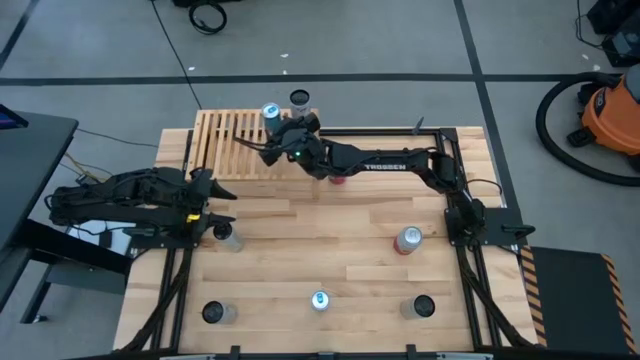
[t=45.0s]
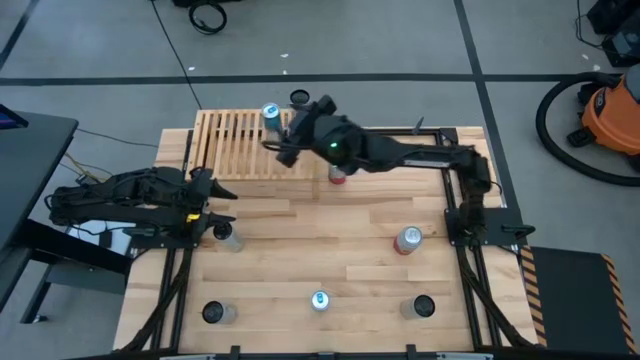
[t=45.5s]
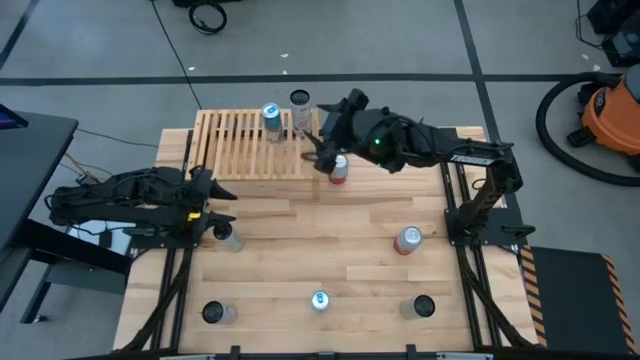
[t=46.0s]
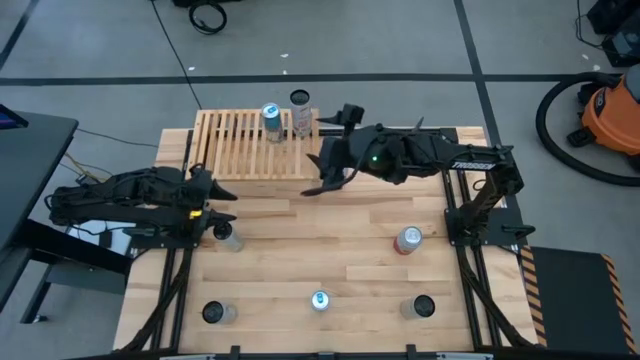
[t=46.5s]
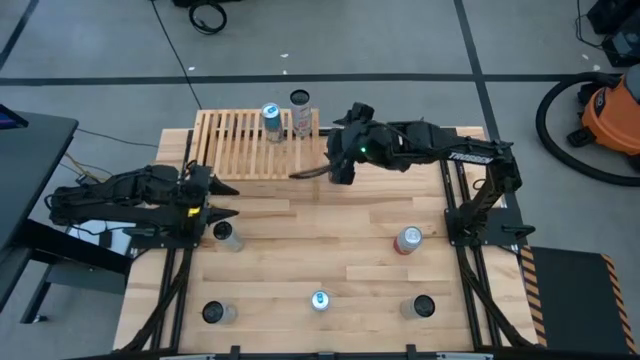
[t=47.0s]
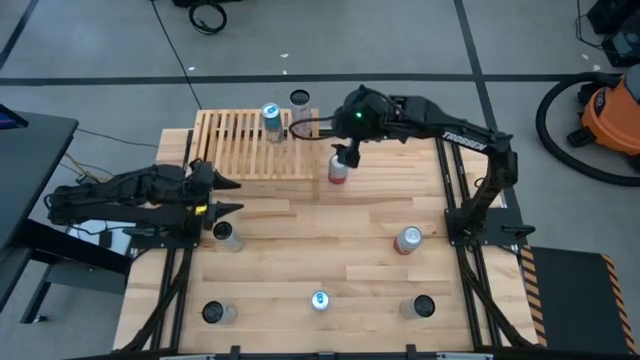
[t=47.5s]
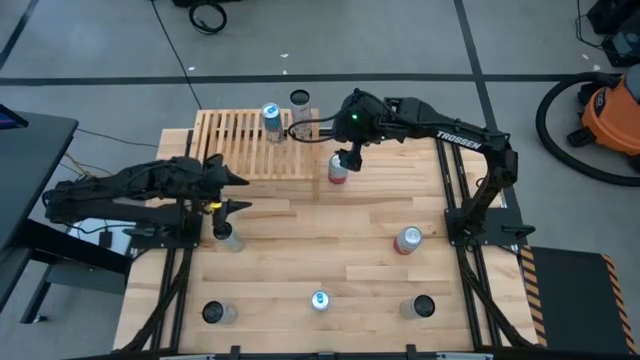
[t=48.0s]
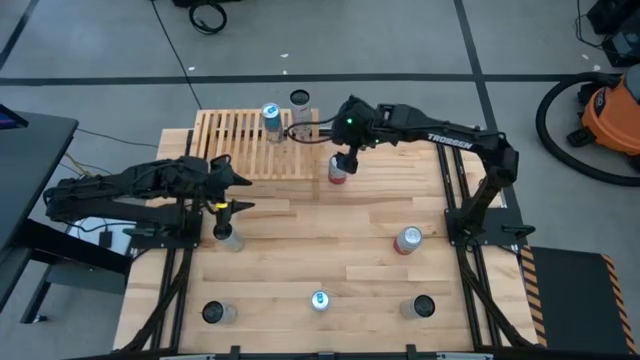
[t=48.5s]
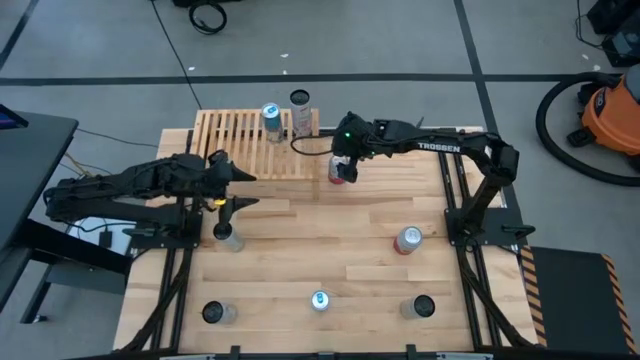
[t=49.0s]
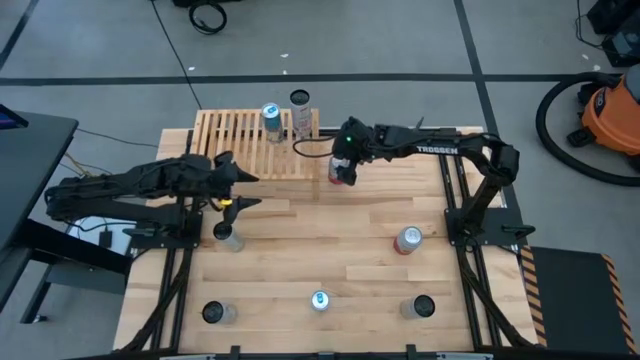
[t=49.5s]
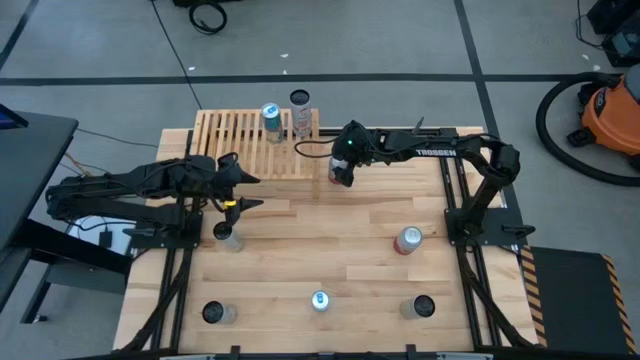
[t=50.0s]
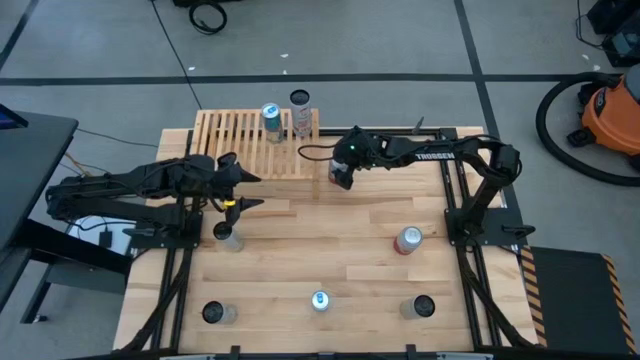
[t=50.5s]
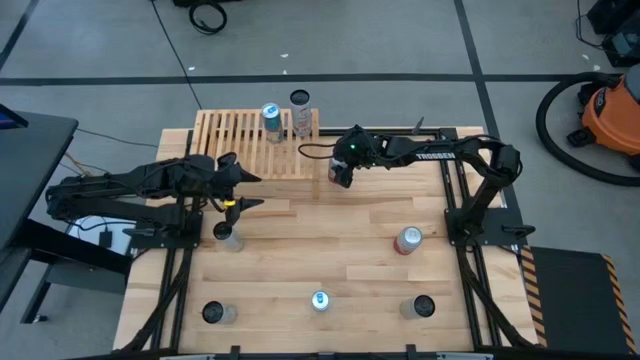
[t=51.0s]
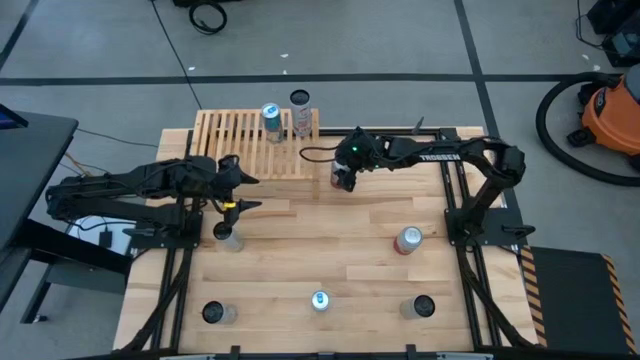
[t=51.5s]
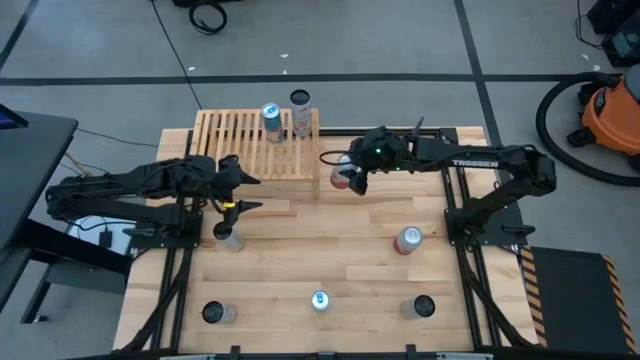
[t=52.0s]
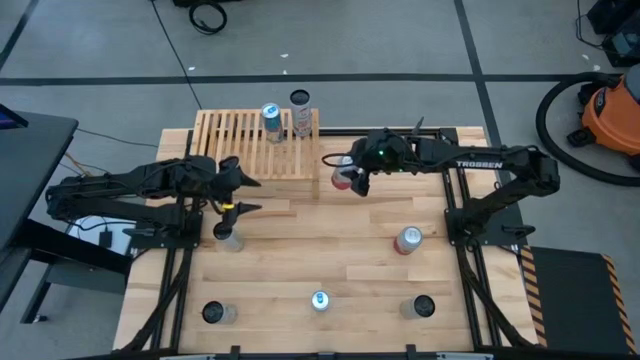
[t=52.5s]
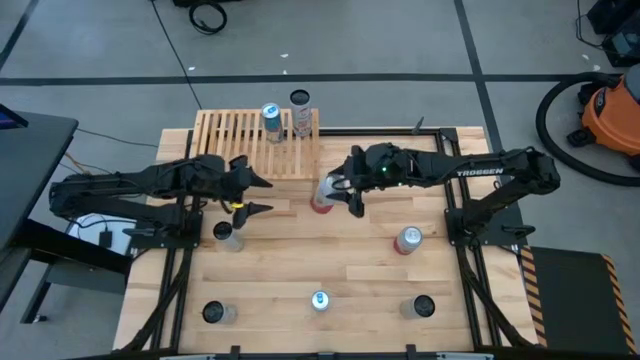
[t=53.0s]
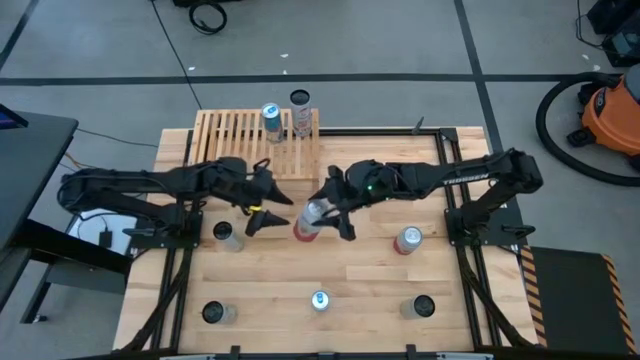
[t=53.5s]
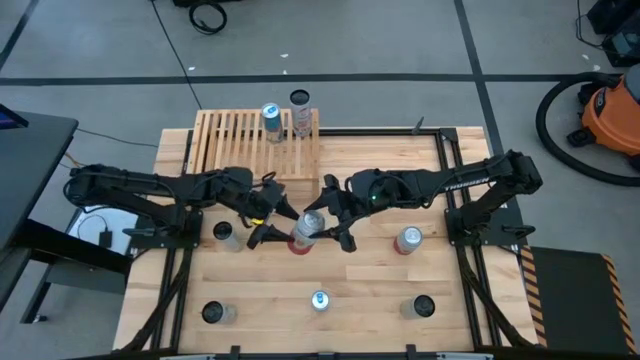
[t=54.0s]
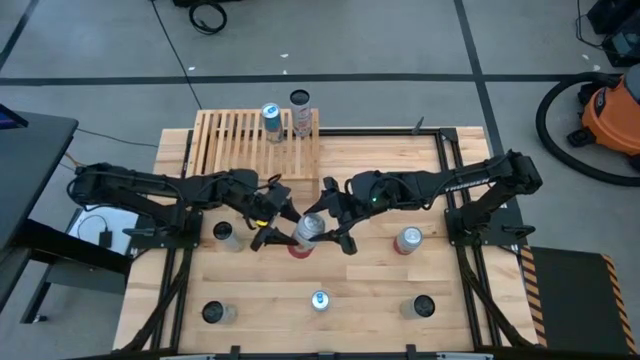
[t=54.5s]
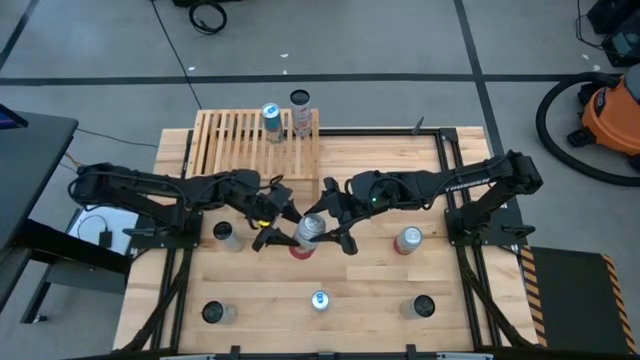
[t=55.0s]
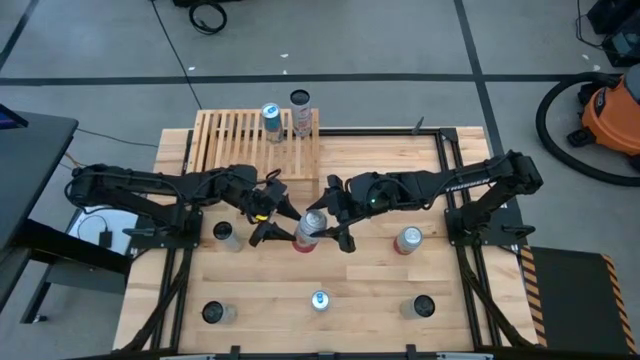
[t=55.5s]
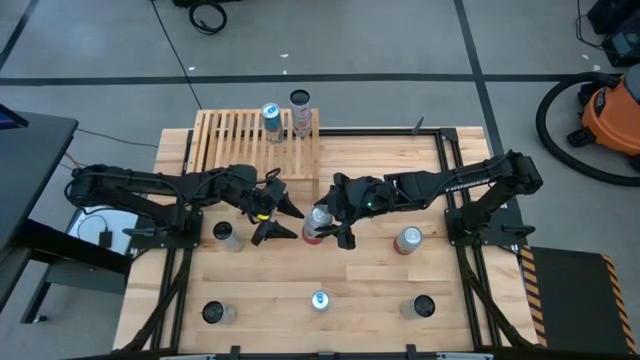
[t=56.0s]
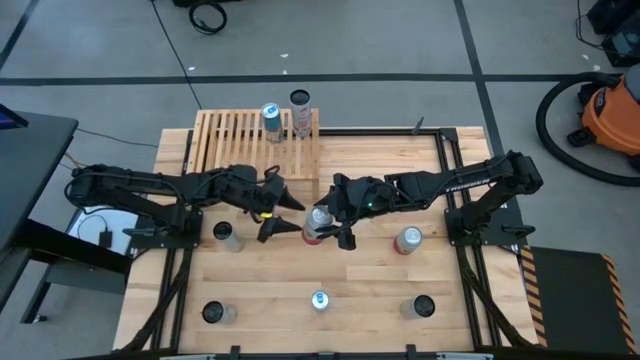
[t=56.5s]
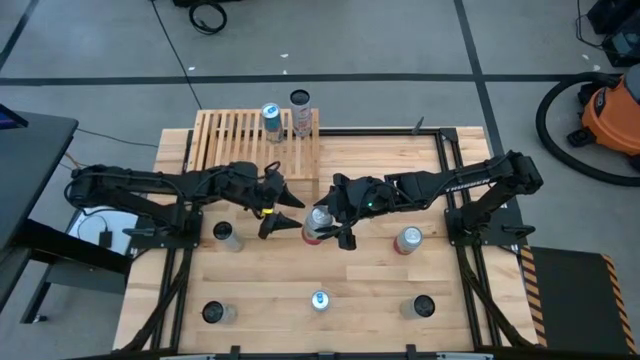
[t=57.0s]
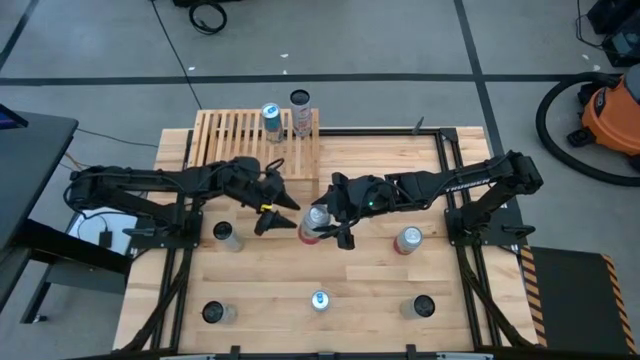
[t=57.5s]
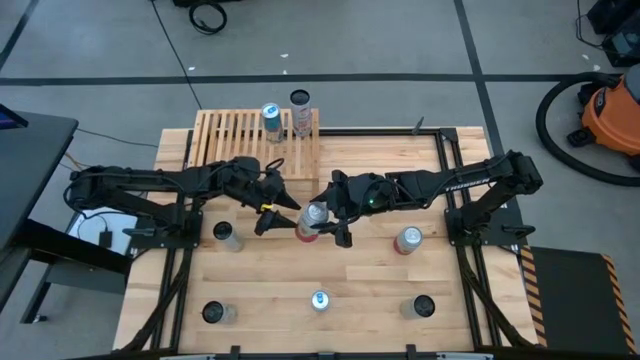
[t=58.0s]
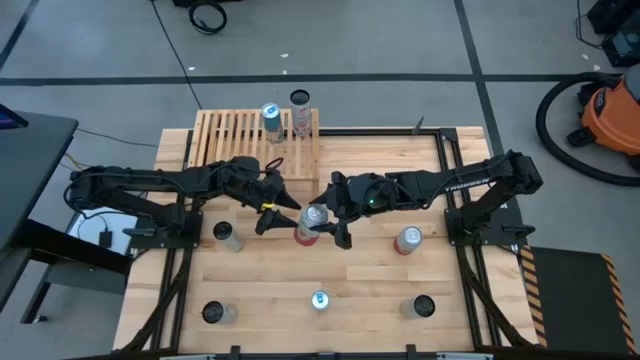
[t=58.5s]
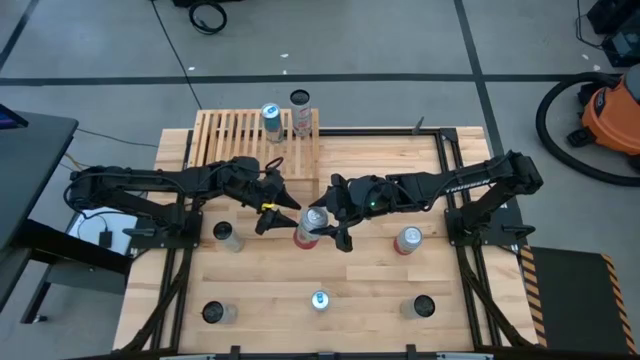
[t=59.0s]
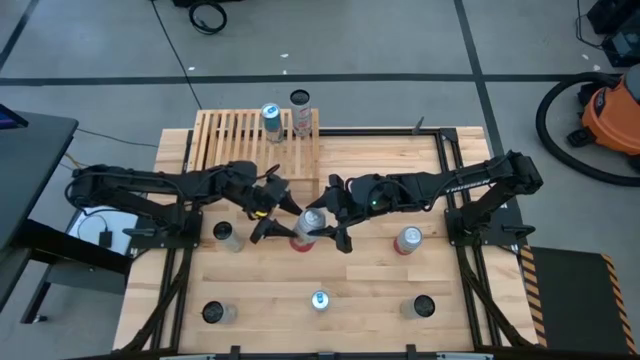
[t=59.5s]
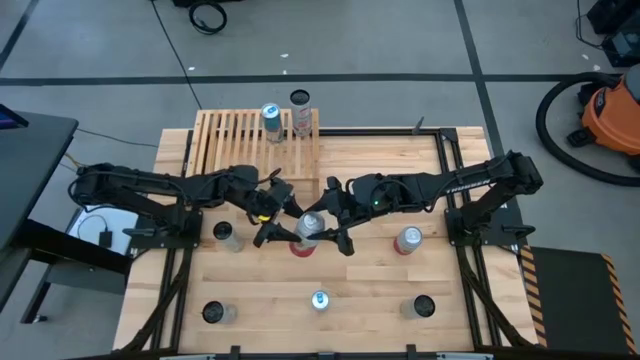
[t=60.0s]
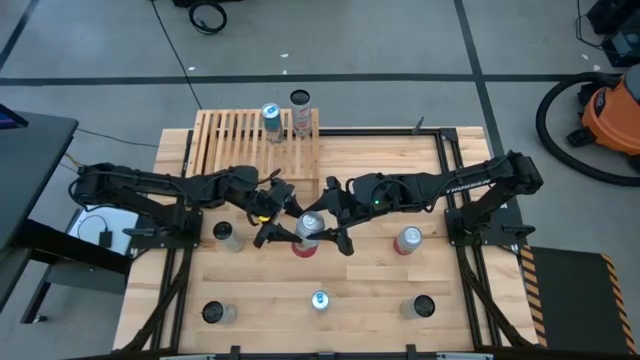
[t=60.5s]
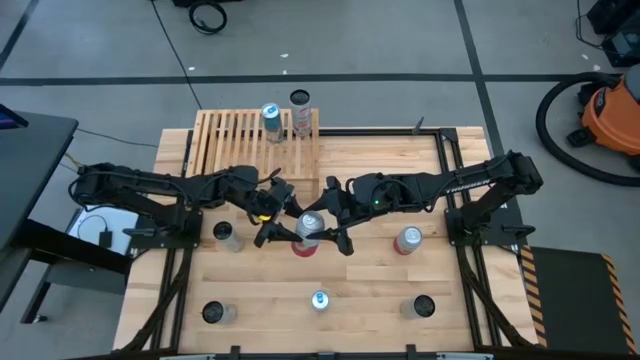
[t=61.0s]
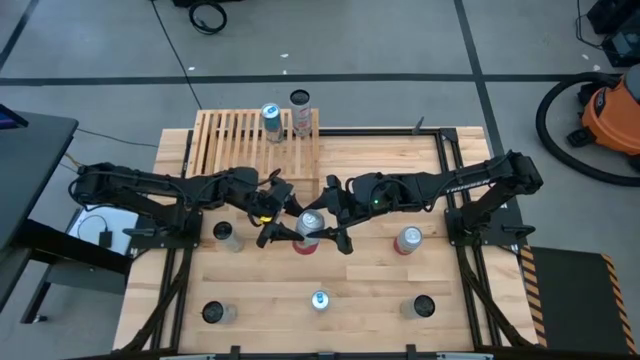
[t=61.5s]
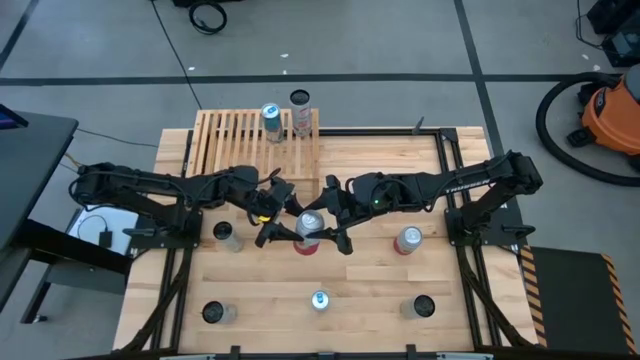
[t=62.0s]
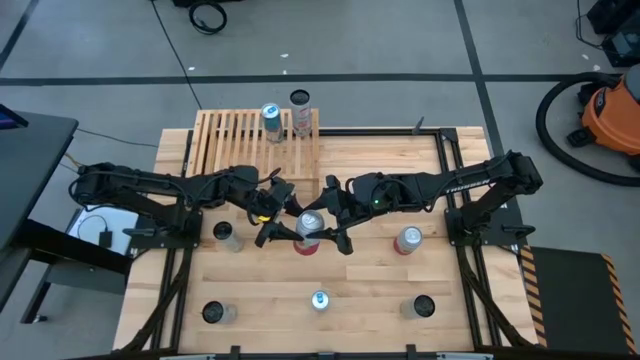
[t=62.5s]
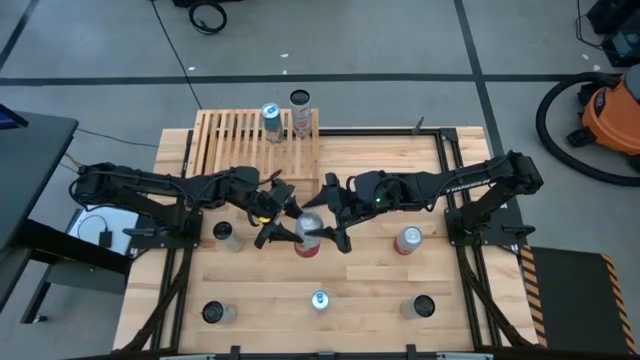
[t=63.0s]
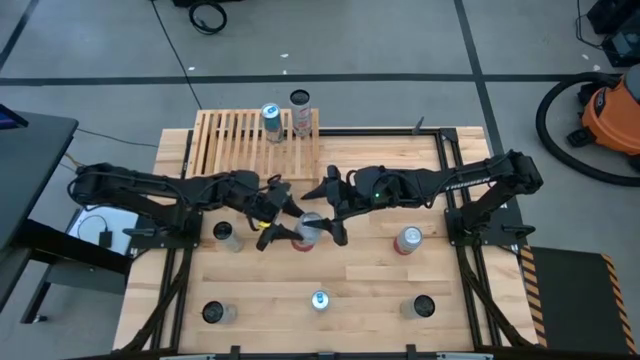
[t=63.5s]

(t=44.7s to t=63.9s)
Task: Place canned beverage on shelf
Put the top pink white soda can on the shelf
